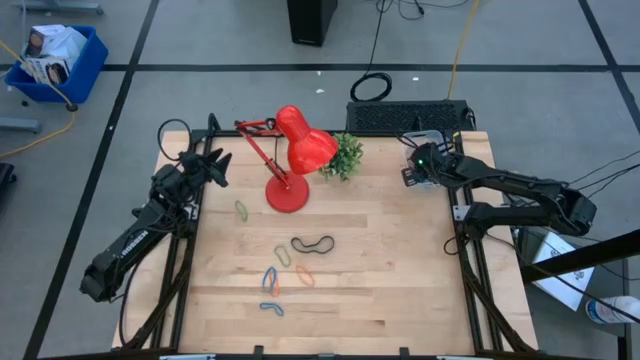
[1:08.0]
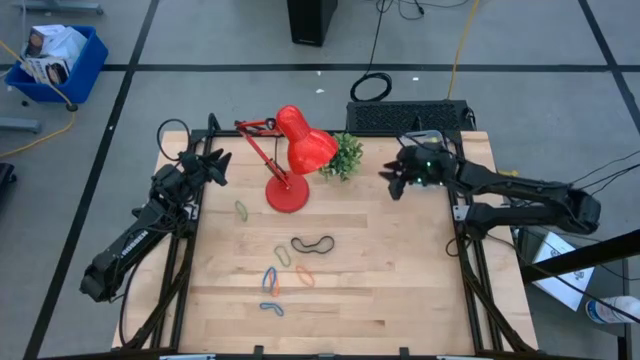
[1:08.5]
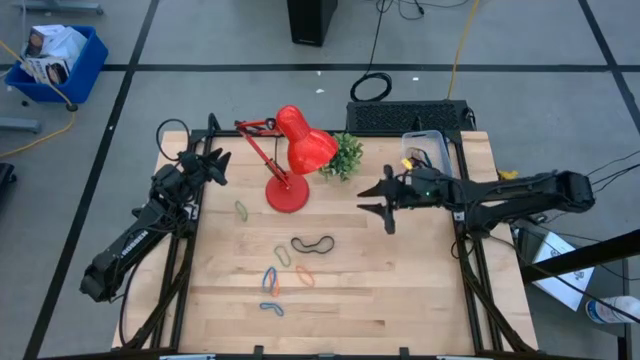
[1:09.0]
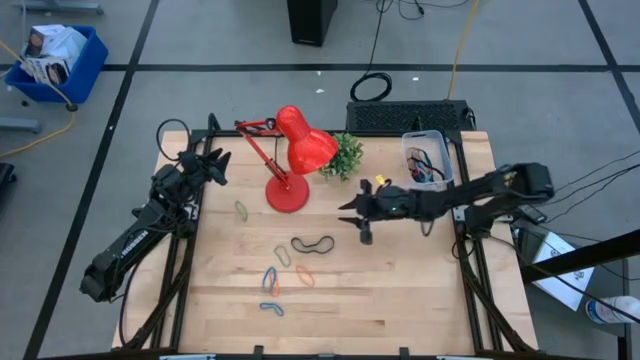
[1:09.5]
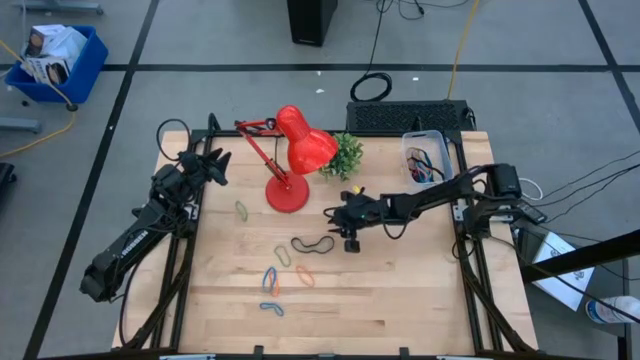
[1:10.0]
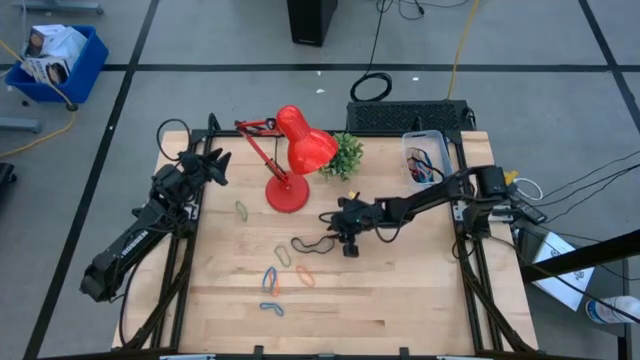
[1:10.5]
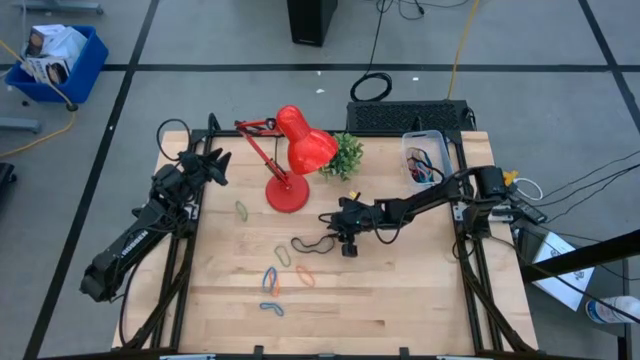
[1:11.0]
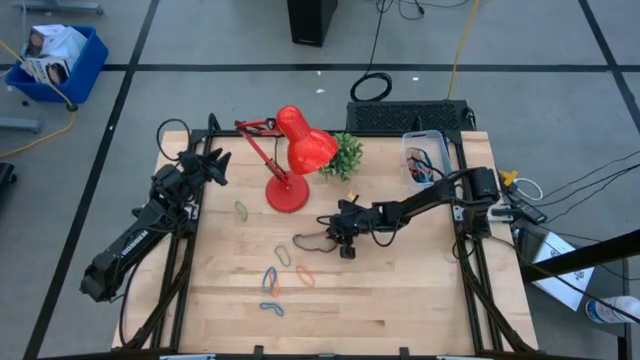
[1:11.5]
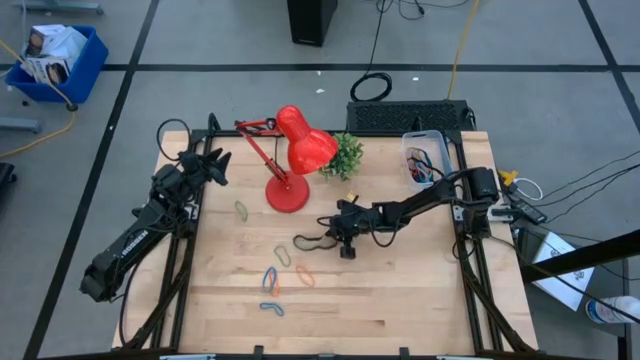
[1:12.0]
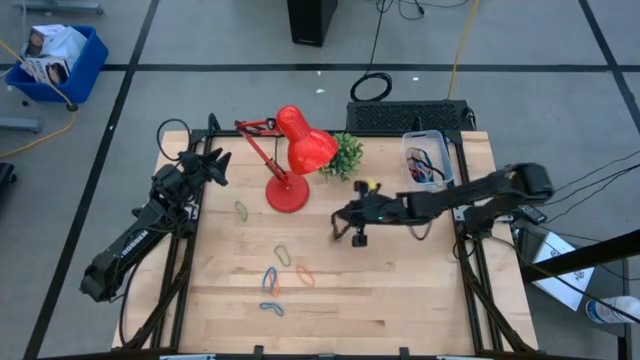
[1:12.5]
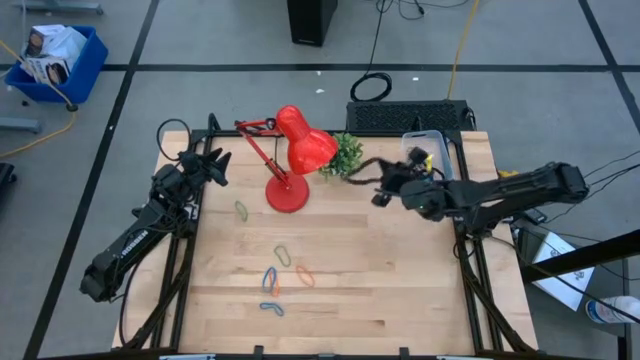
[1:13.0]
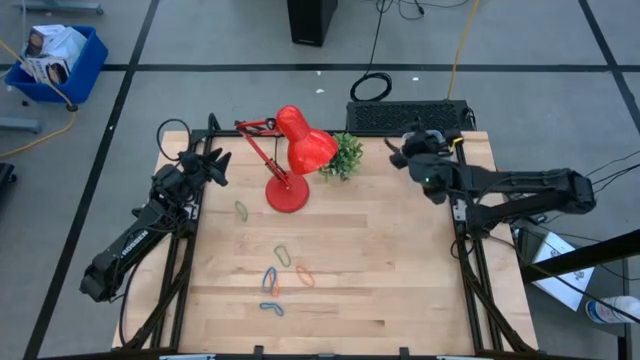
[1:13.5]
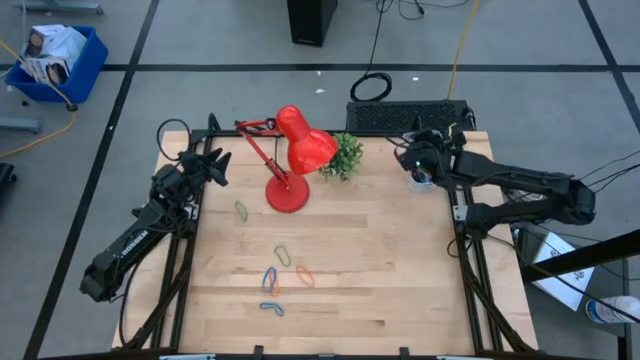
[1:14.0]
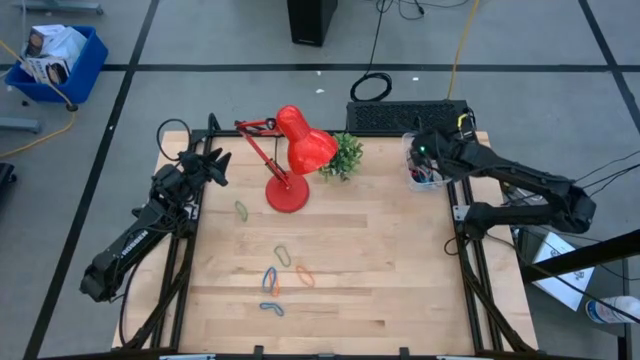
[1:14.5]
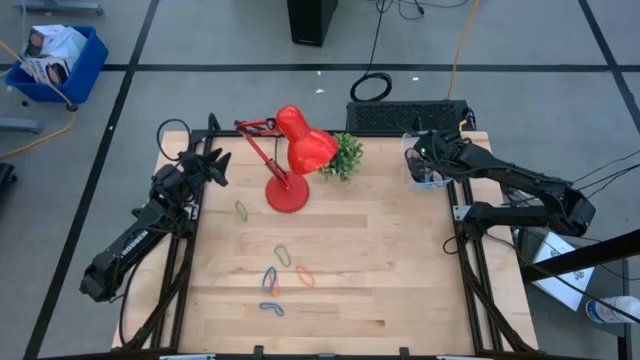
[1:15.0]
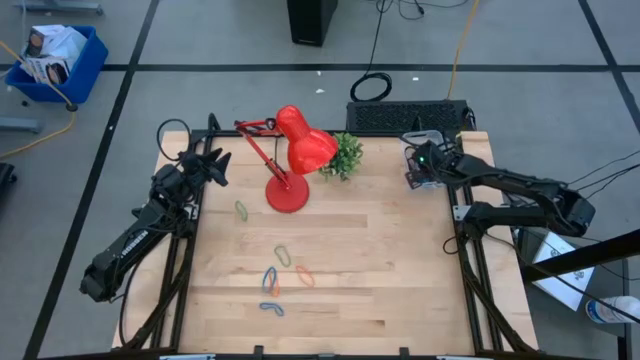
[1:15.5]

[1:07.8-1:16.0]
Task: Pick and place rubber bands into bin
Put the black rubber band into the transparent bin

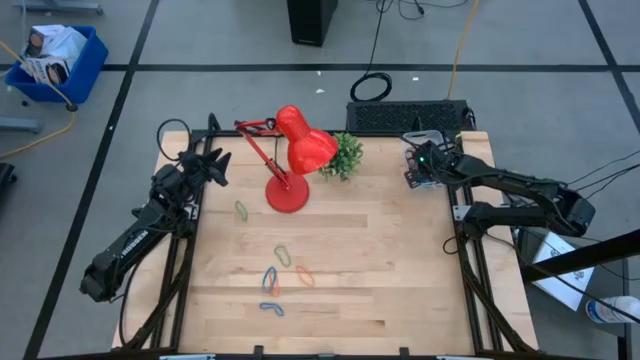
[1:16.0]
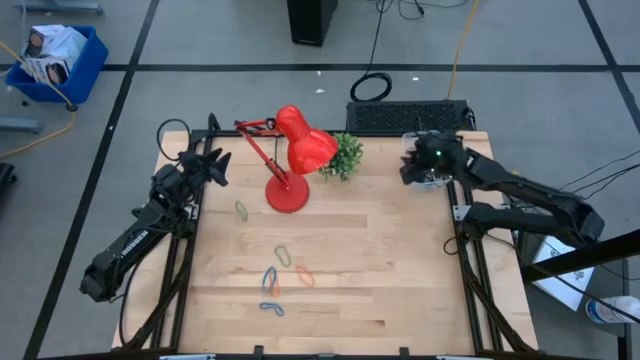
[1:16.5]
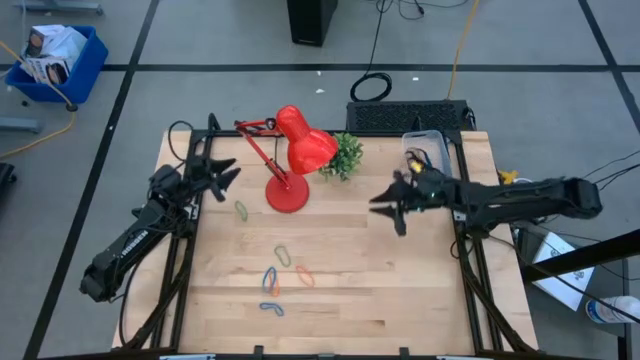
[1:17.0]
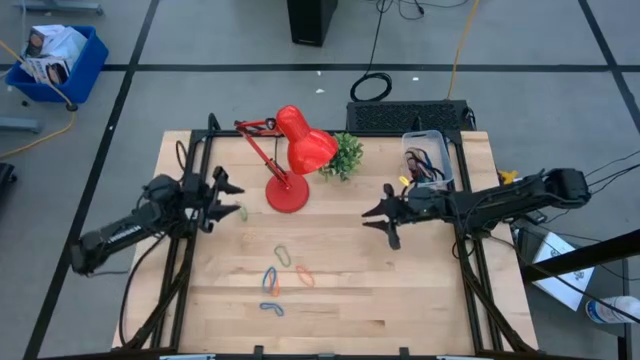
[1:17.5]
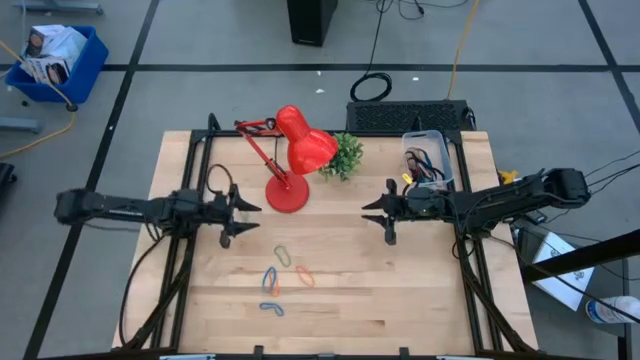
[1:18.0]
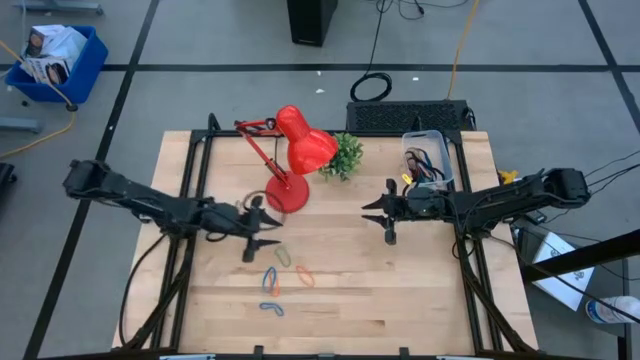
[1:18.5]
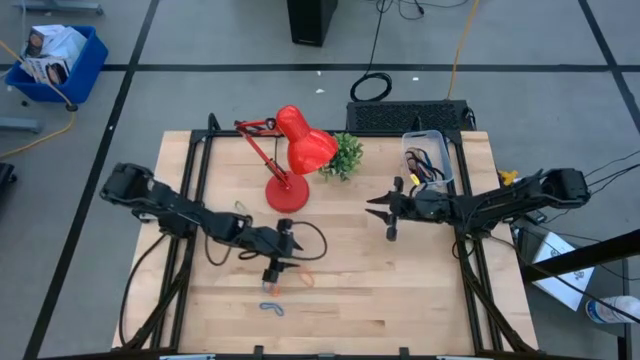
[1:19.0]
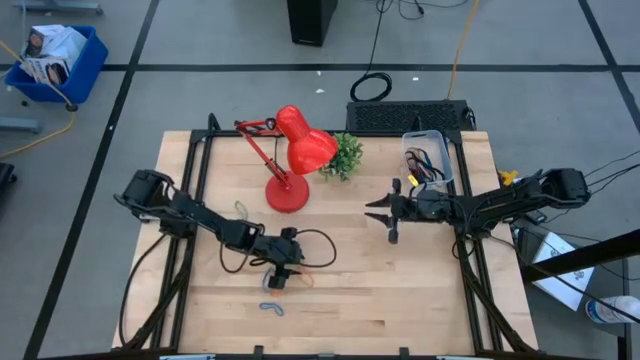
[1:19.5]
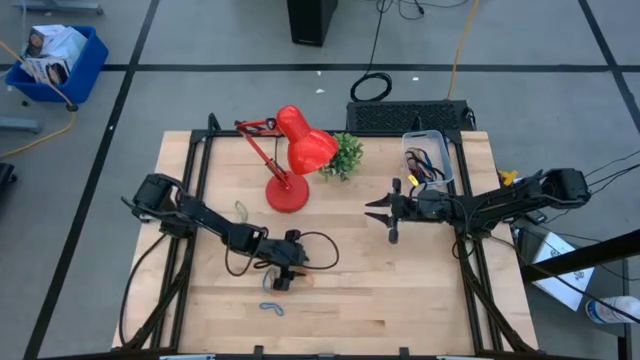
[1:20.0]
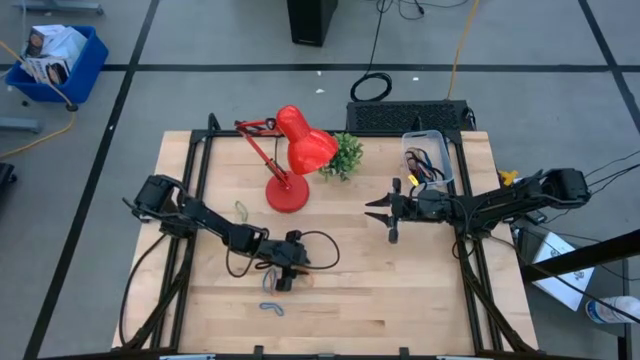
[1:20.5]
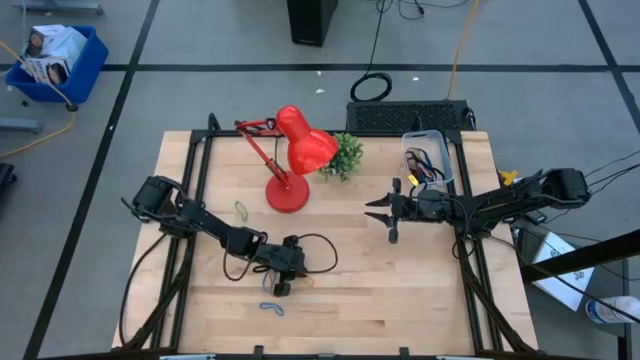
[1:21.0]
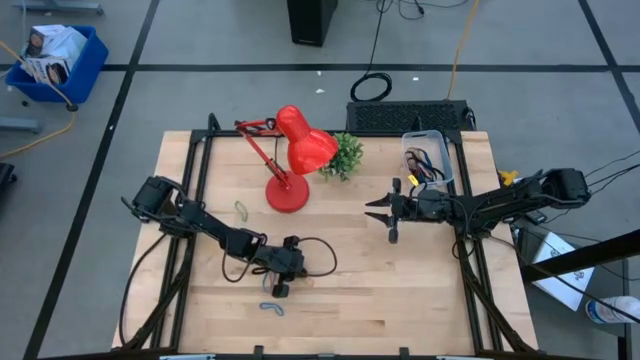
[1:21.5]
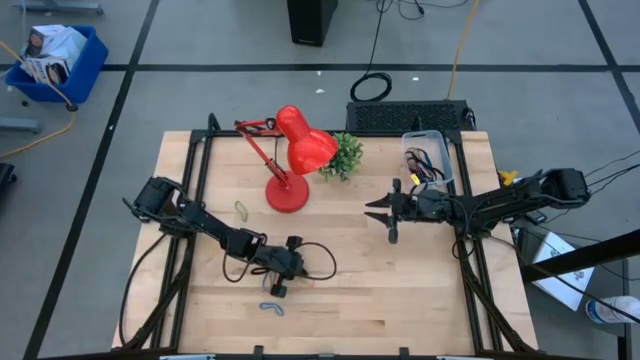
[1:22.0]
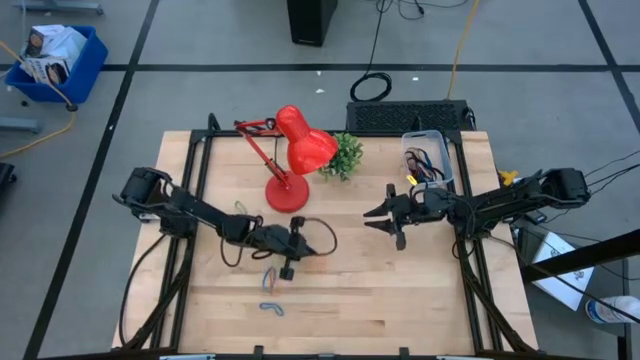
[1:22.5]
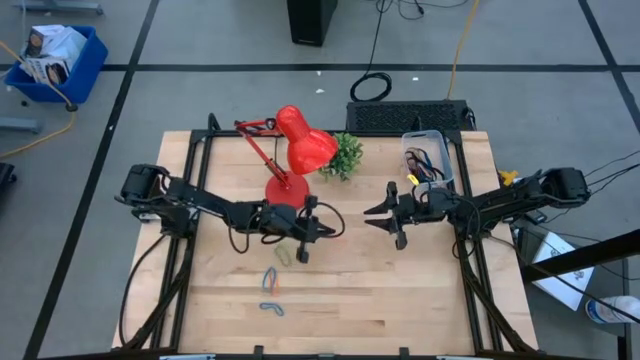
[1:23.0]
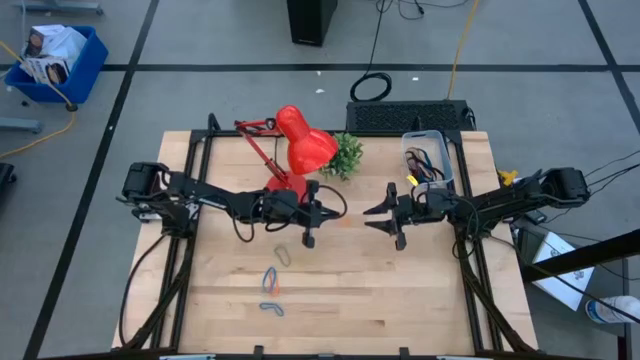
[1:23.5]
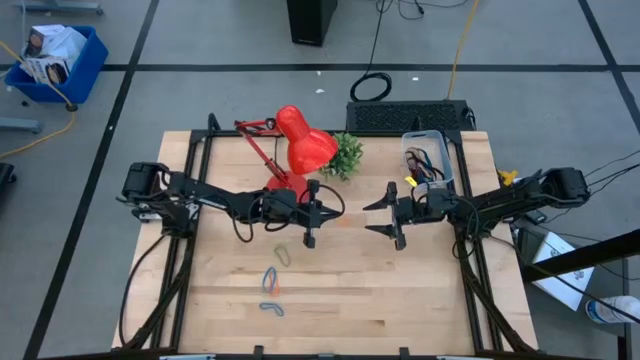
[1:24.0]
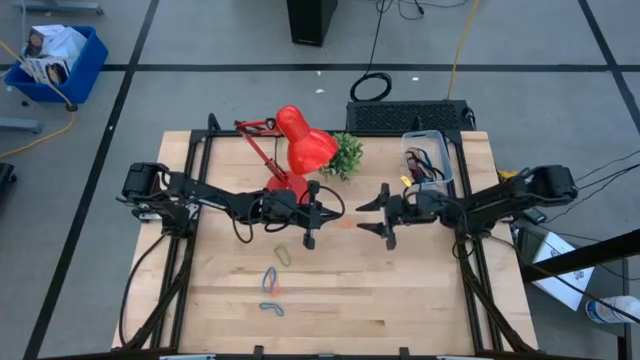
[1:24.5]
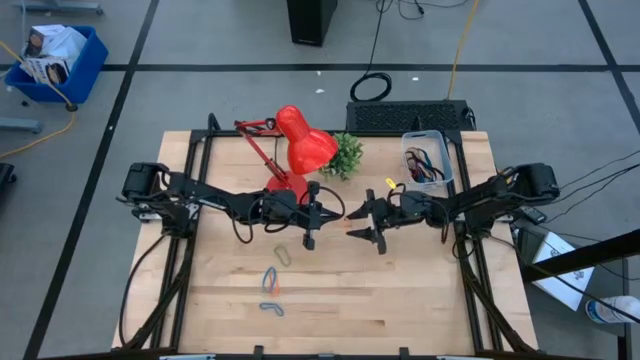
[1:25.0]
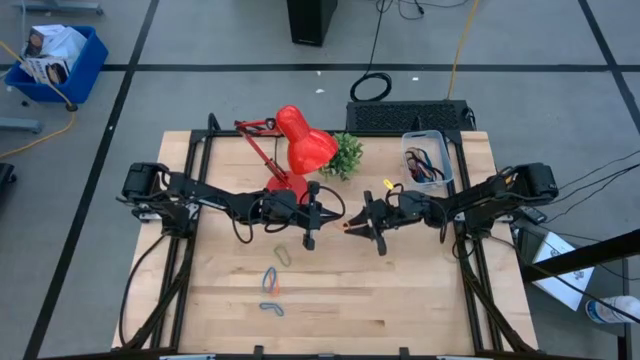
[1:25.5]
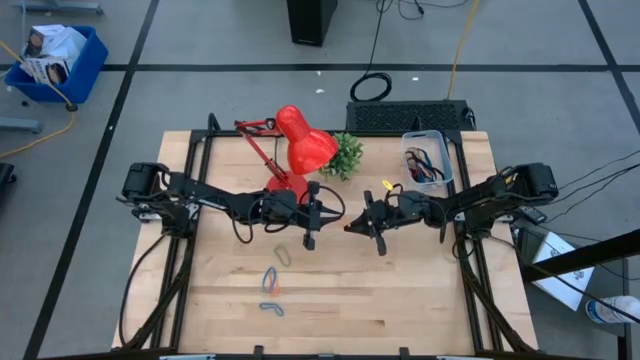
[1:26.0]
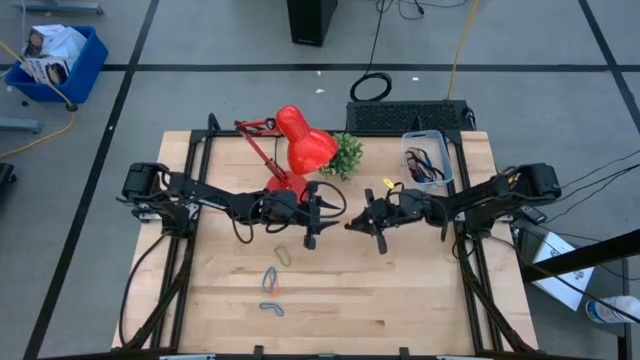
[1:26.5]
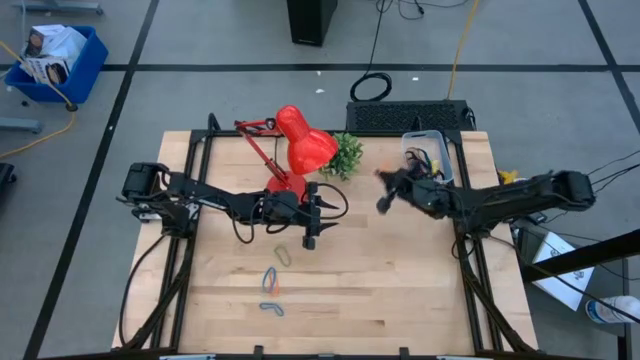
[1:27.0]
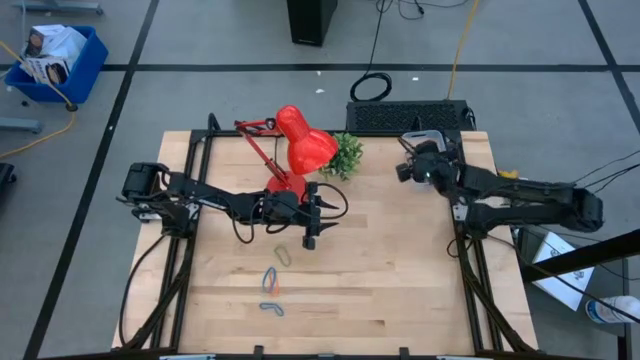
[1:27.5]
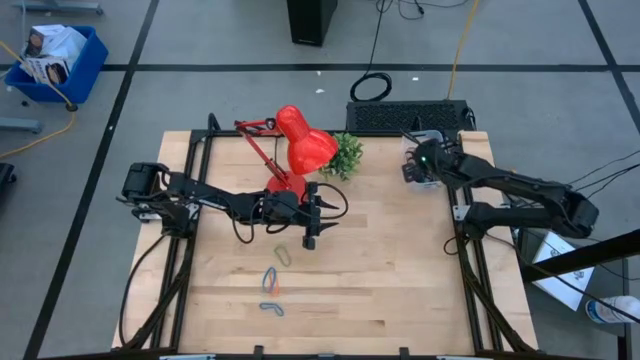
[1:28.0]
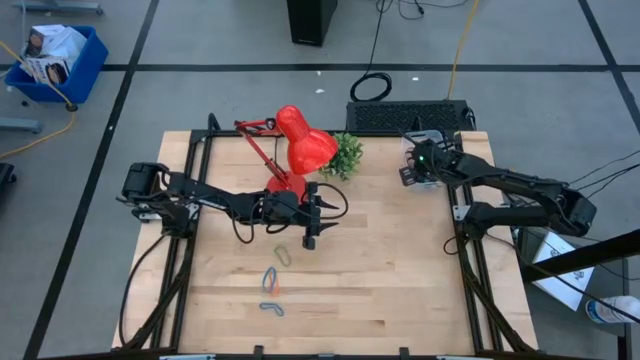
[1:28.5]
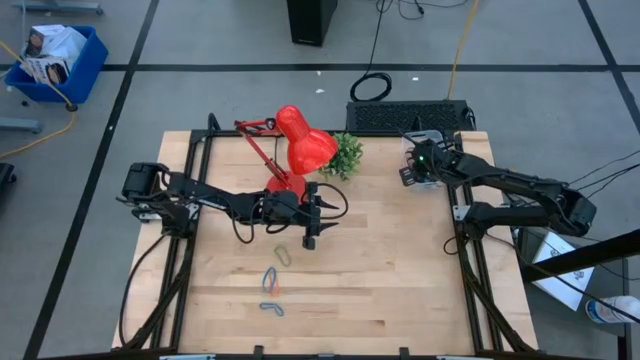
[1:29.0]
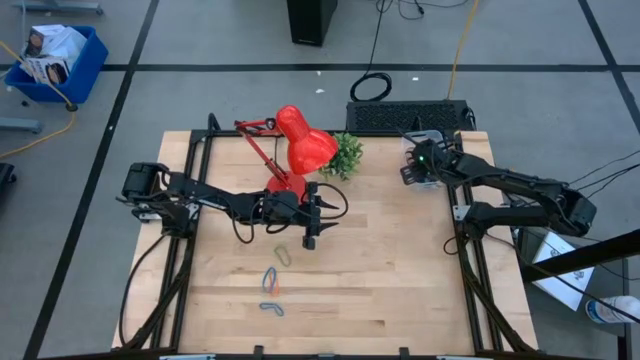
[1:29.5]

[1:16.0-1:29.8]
Put the right orange rubber band into the transparent bin
